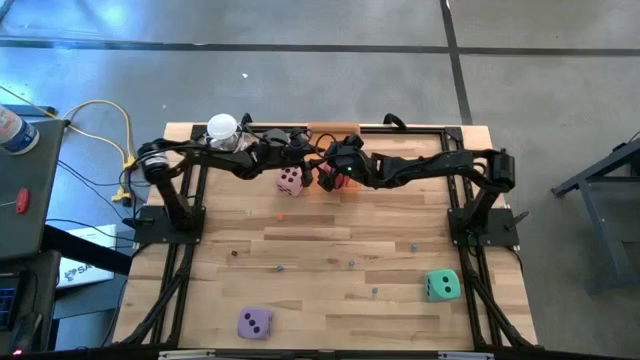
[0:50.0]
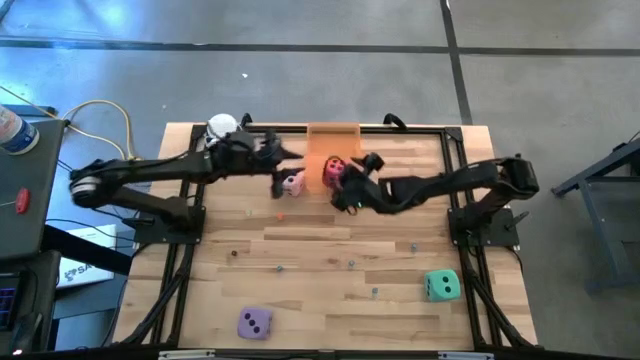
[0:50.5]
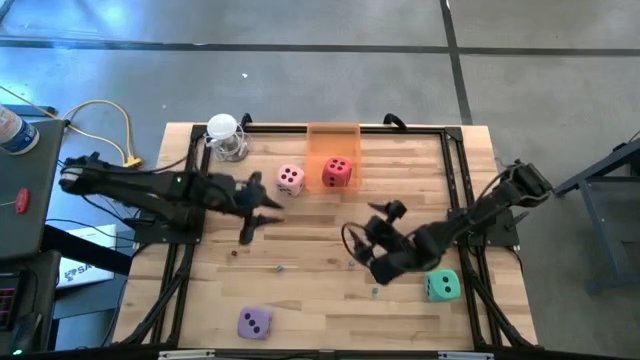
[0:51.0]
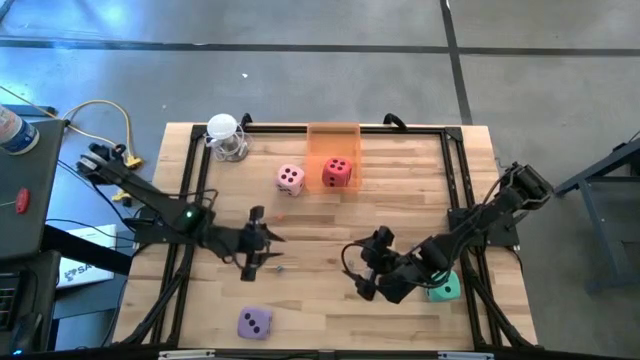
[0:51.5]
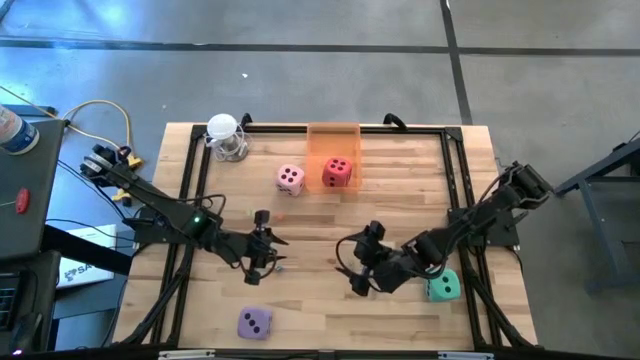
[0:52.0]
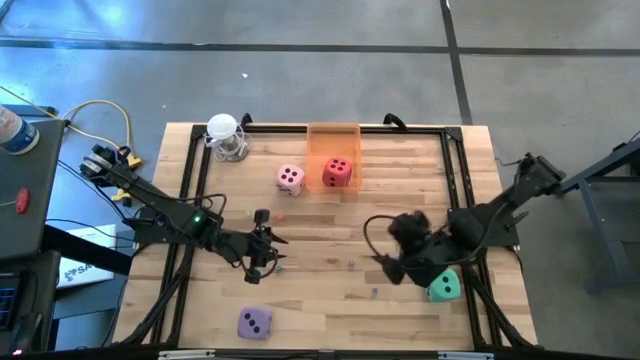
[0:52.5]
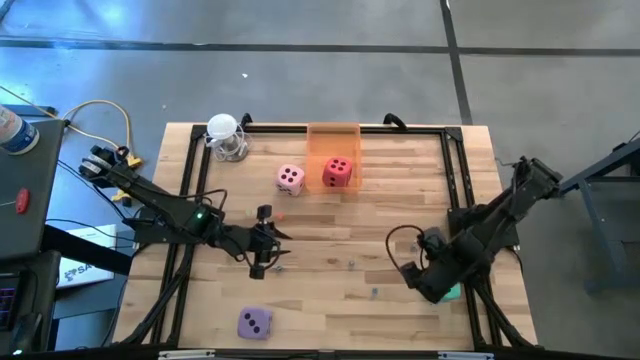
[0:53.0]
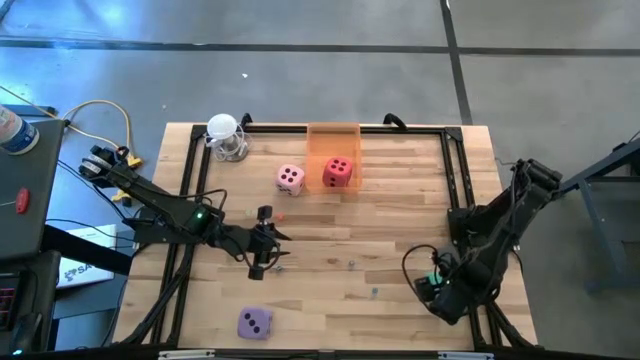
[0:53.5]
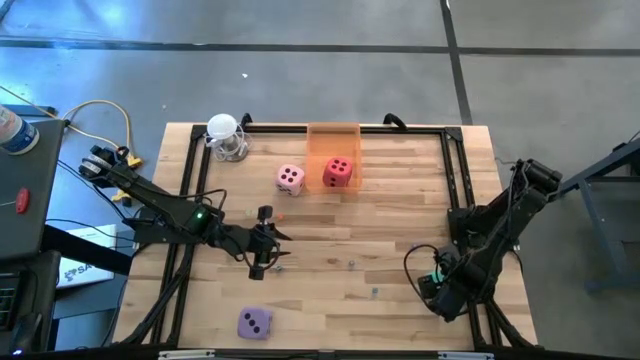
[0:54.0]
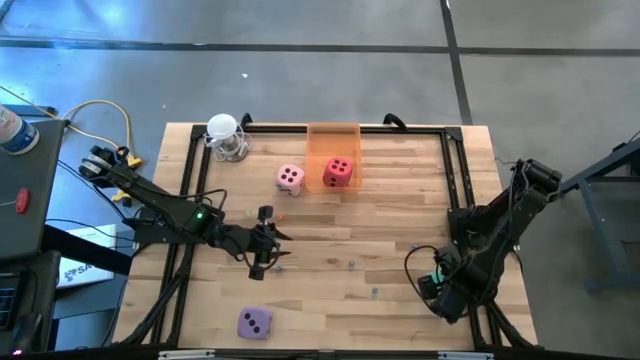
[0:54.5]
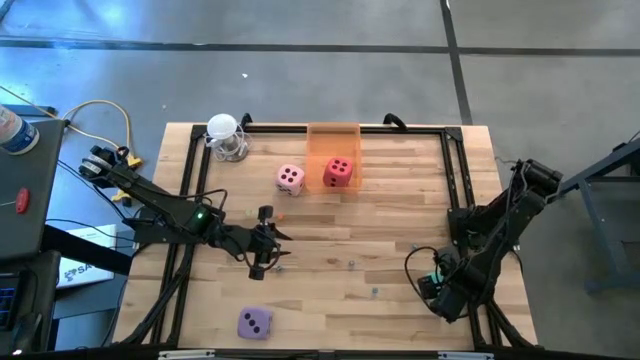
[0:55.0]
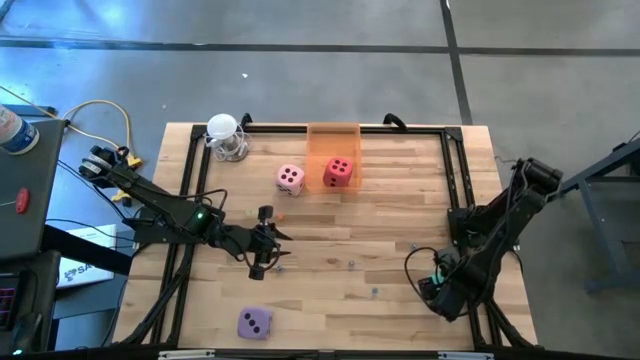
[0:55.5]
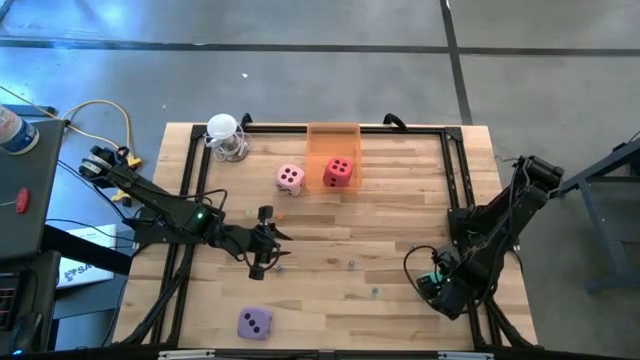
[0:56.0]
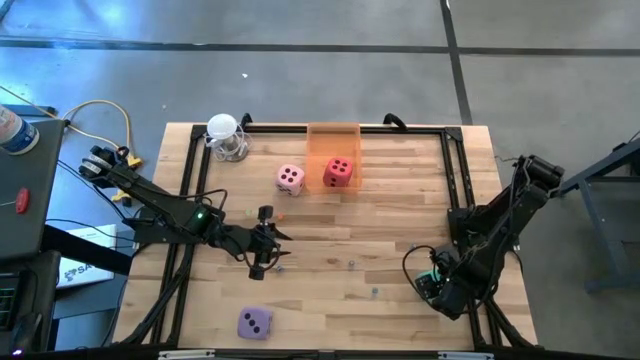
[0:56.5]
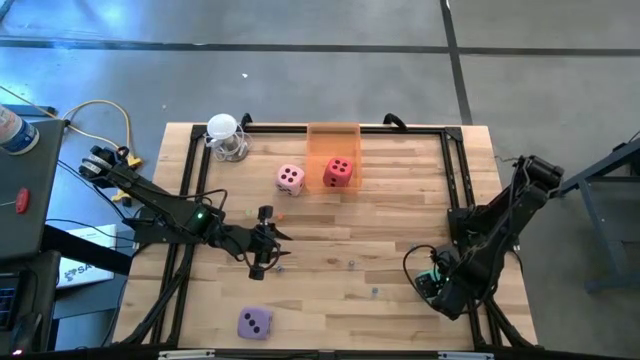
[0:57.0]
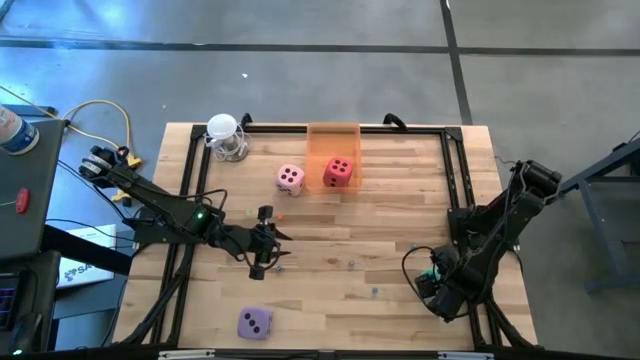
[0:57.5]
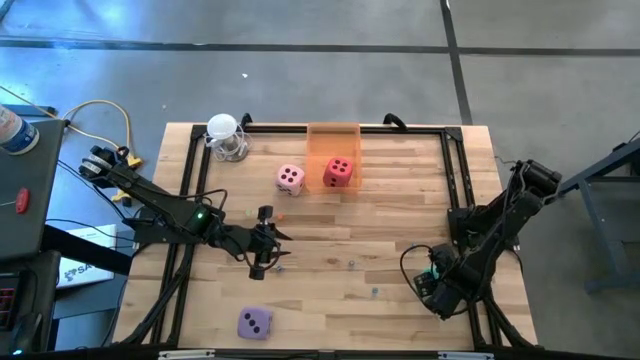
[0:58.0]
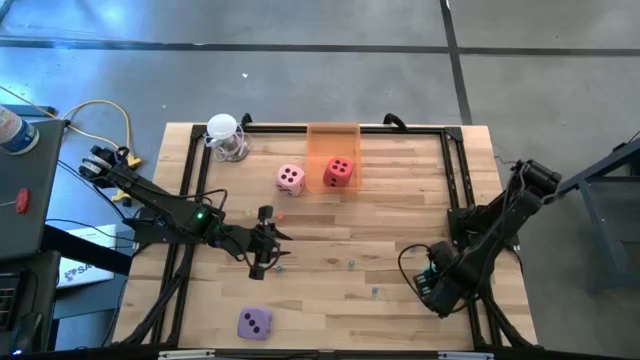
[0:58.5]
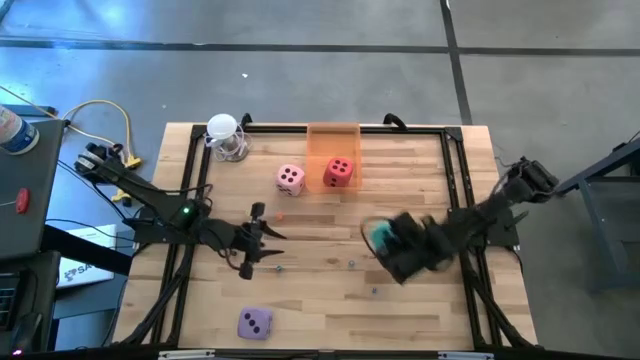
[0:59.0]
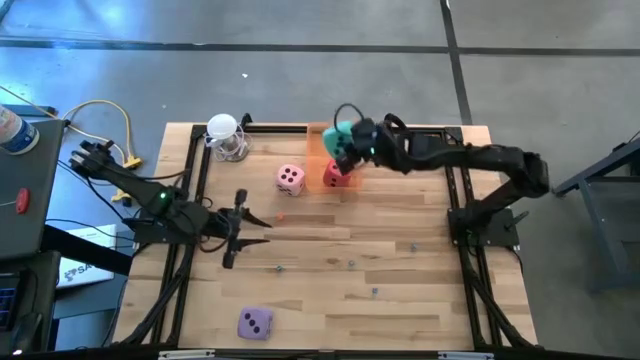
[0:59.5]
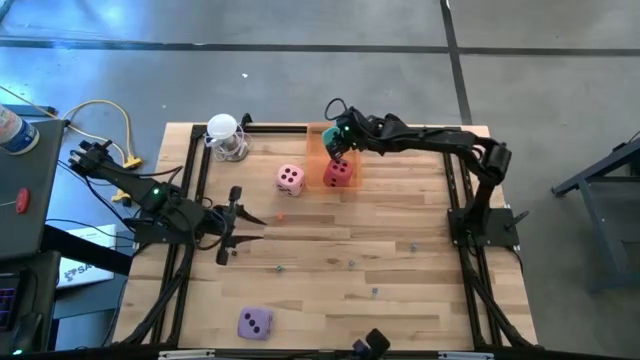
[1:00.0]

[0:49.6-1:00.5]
Task: Pick & Place Dice
Put the light blue die into the orange bin

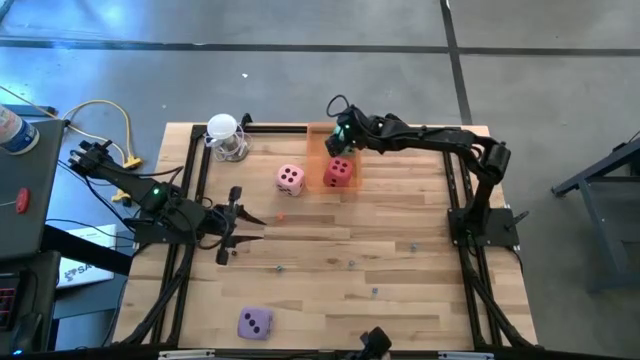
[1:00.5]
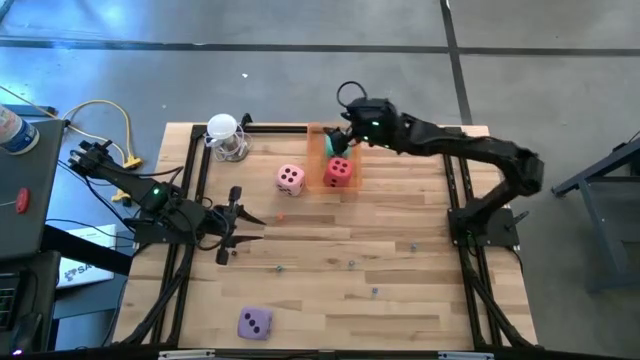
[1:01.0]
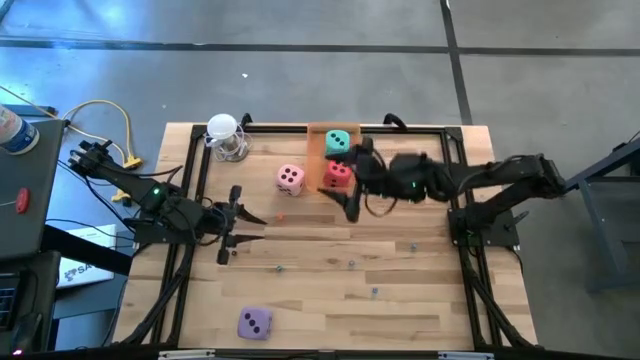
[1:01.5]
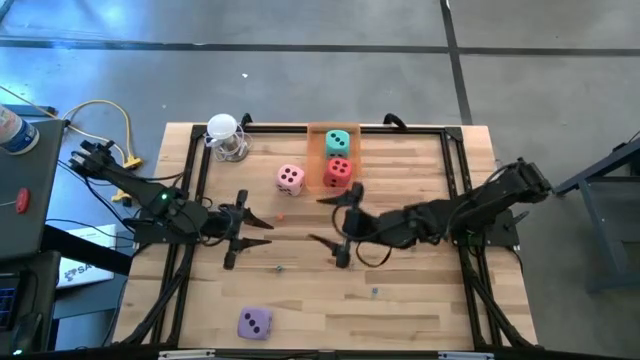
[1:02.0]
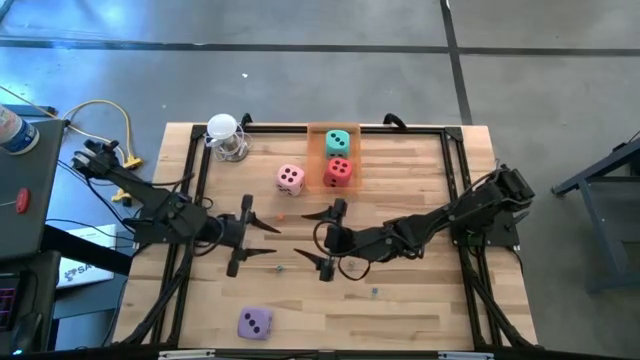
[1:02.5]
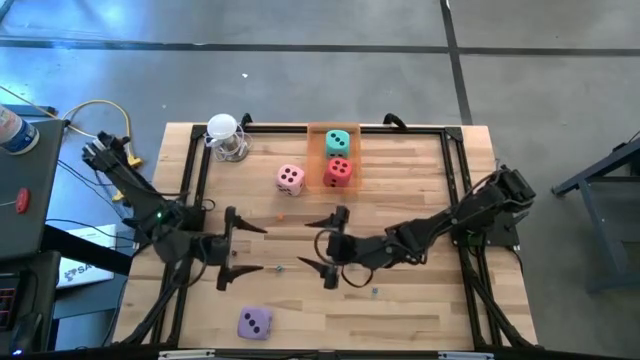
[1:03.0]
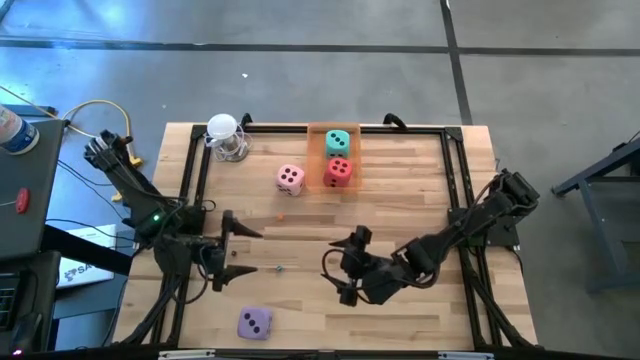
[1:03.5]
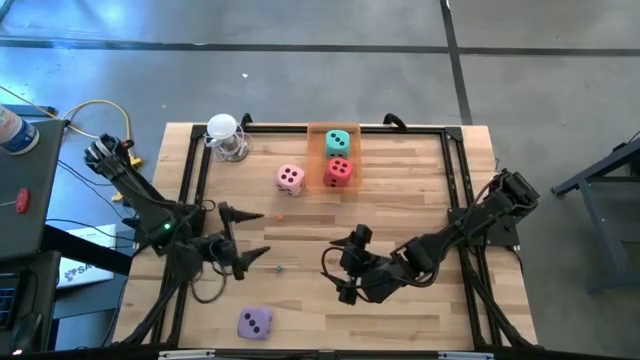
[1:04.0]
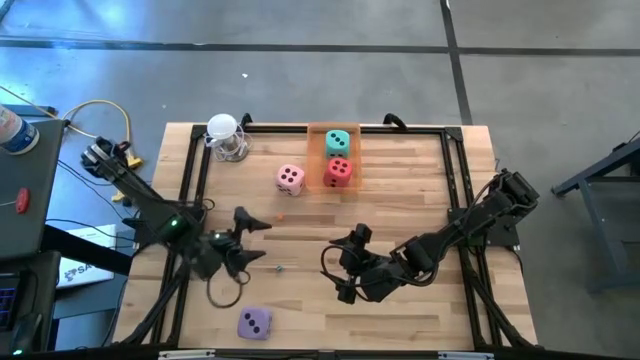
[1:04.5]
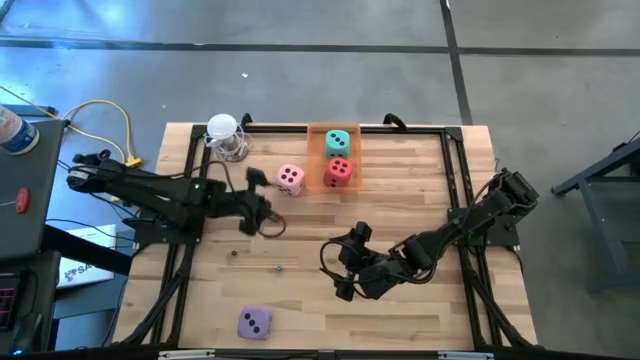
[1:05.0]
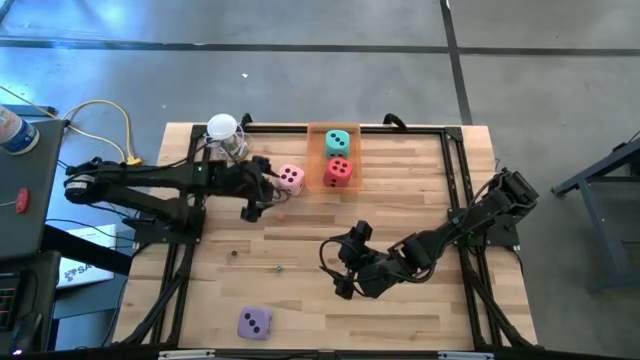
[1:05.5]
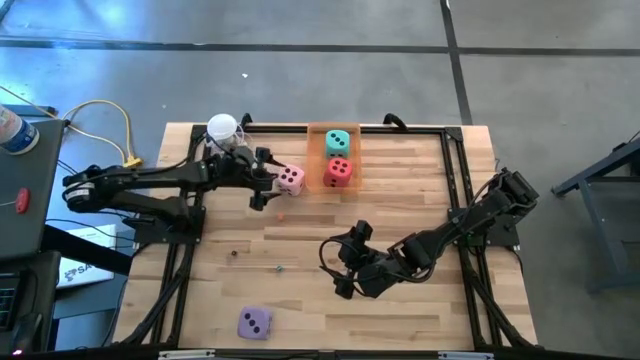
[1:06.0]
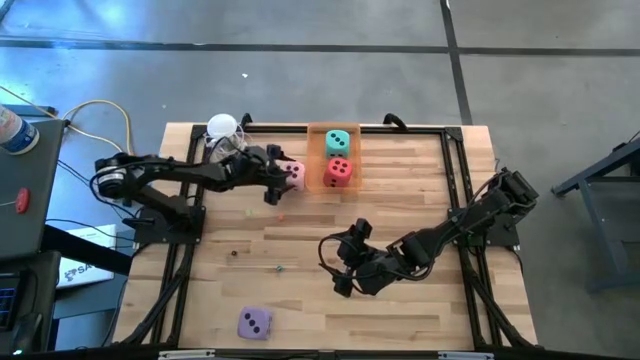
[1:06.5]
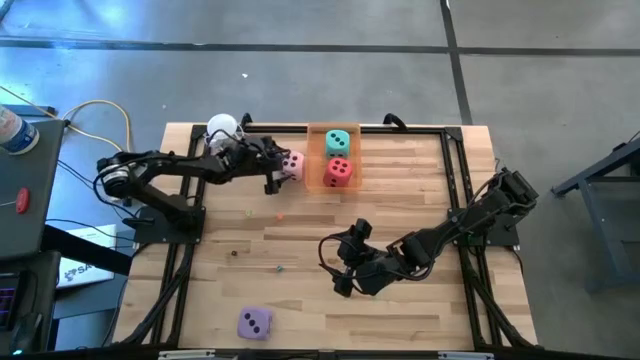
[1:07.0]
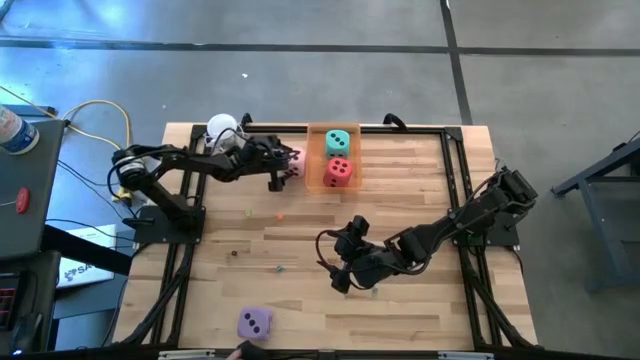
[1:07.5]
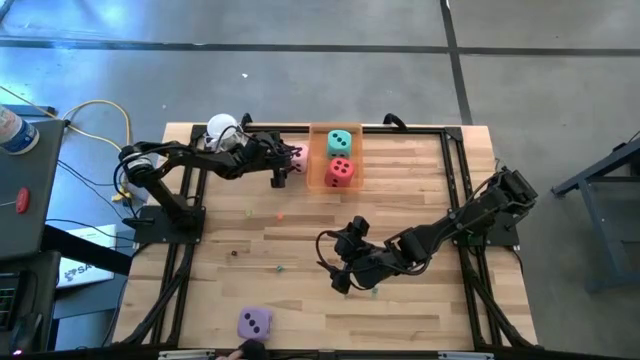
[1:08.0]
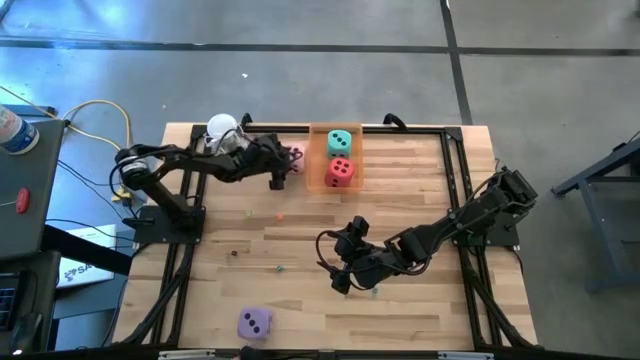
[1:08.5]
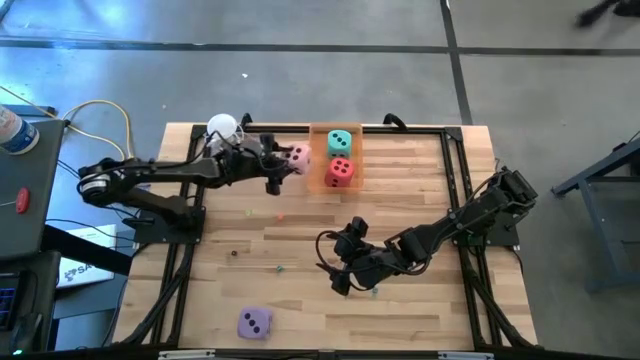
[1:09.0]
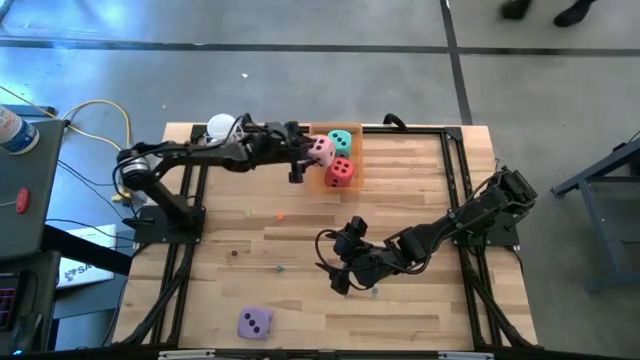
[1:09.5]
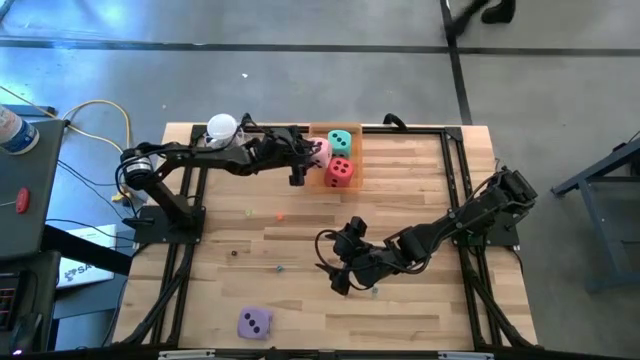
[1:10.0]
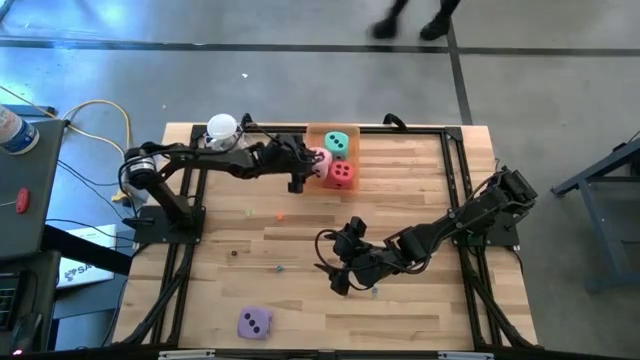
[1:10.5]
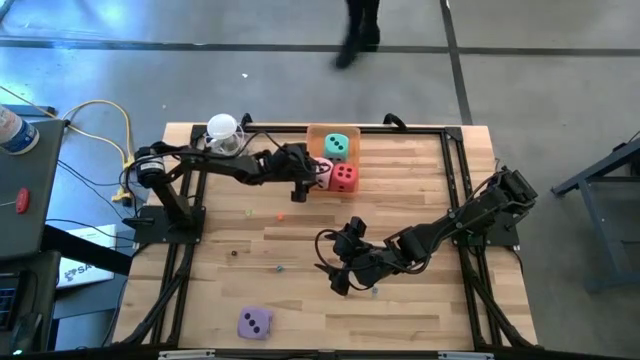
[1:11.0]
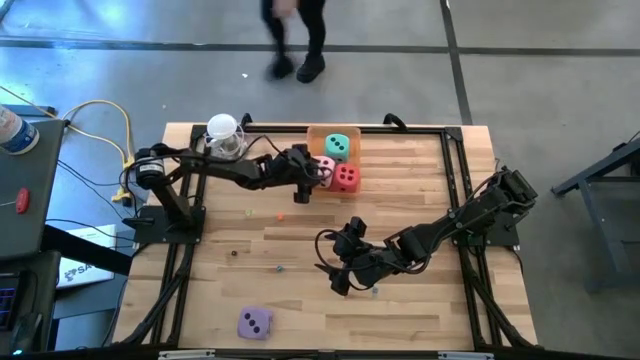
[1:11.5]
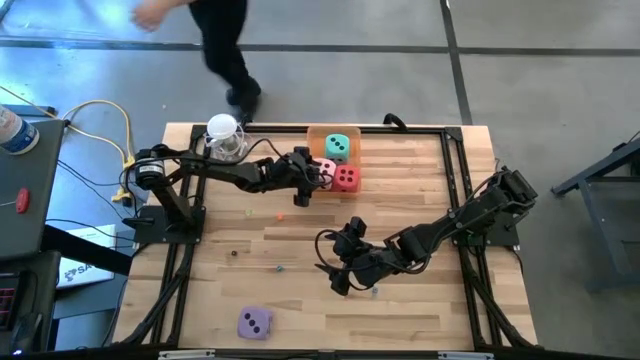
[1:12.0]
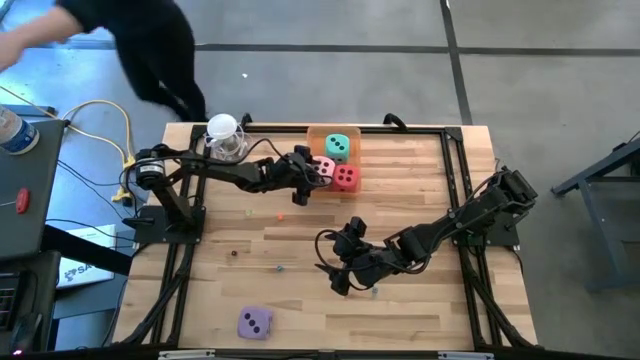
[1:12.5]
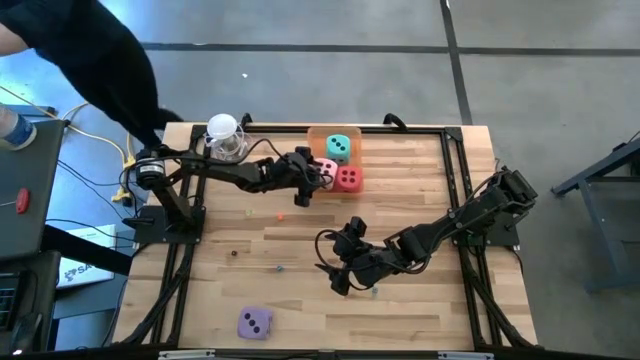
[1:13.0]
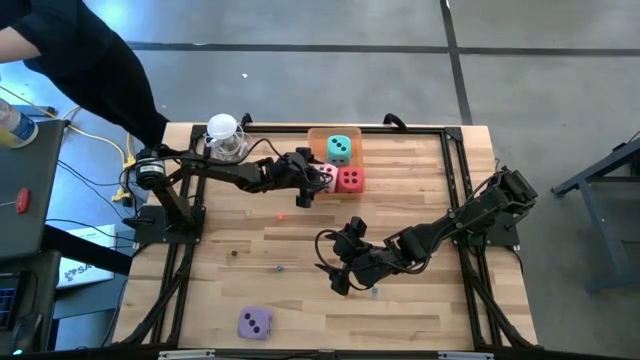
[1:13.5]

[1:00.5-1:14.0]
Put the light pink die into the orange bin
